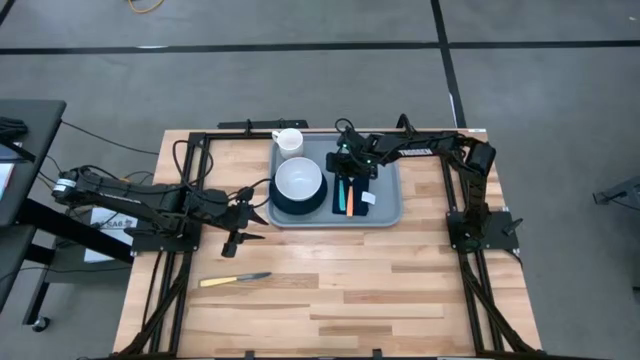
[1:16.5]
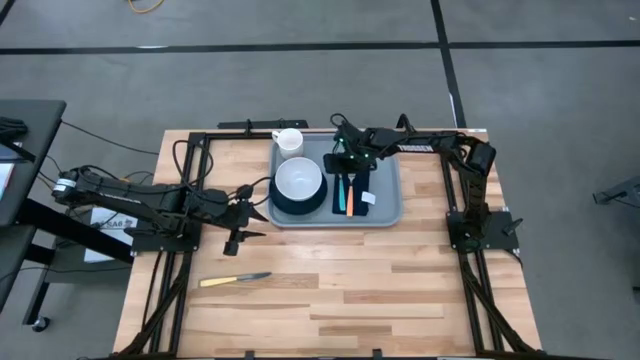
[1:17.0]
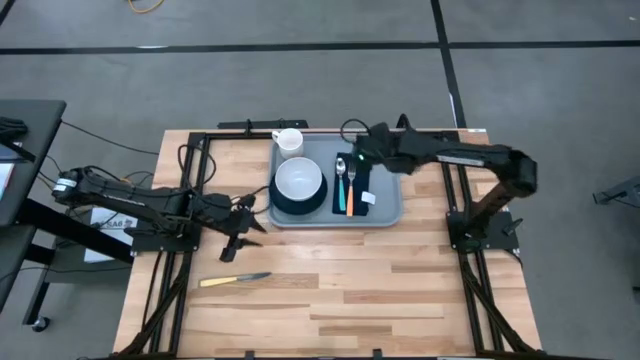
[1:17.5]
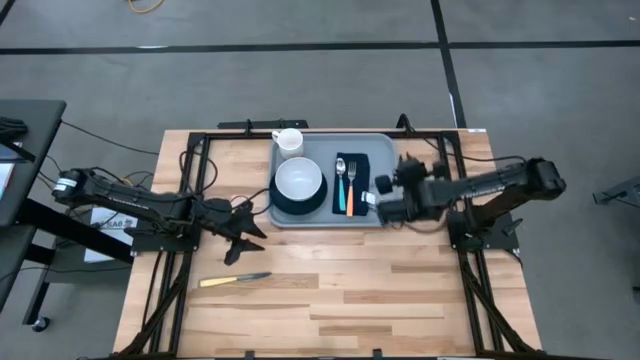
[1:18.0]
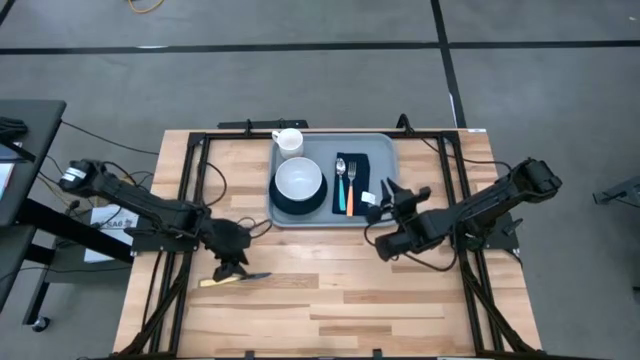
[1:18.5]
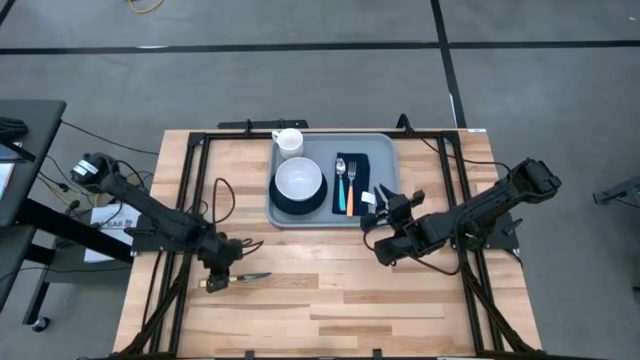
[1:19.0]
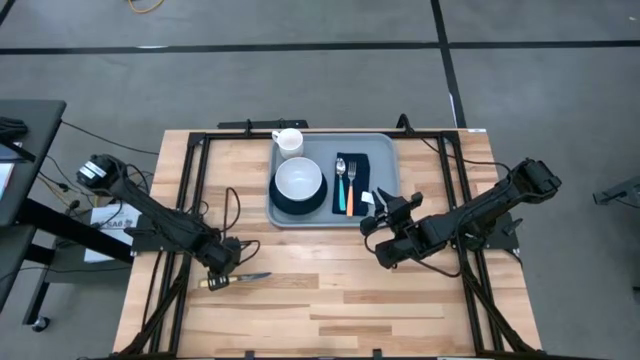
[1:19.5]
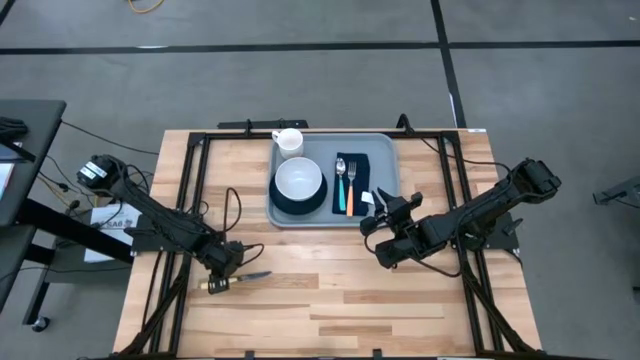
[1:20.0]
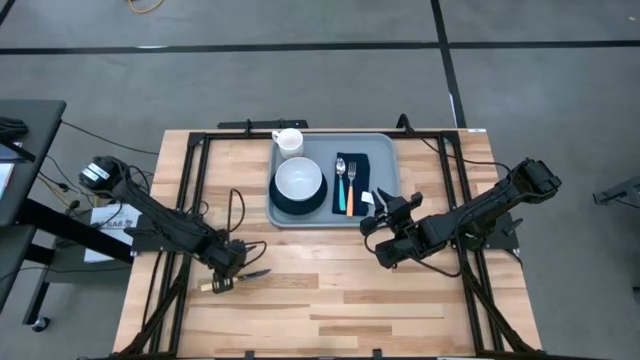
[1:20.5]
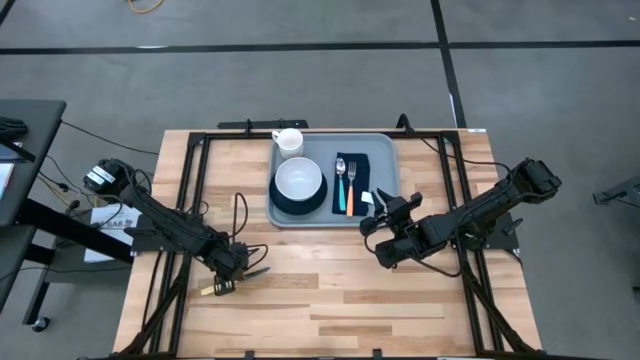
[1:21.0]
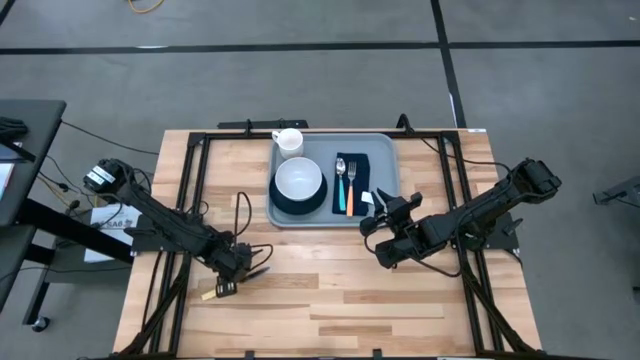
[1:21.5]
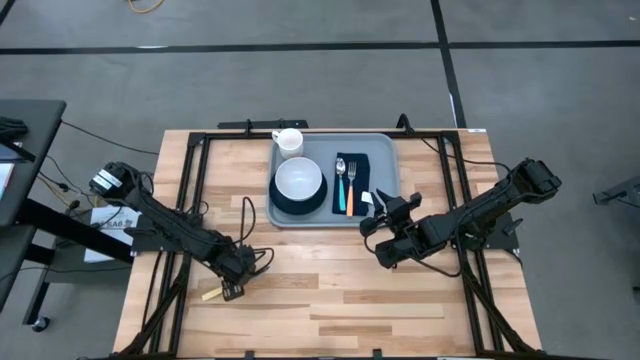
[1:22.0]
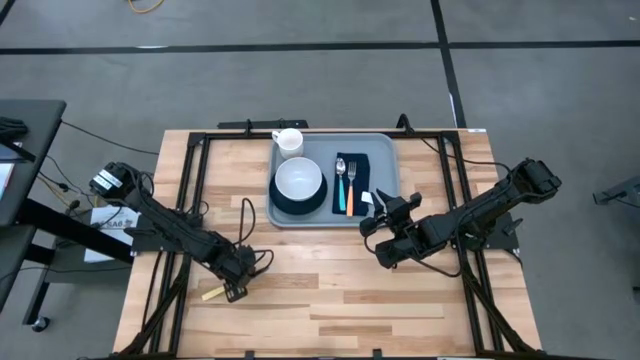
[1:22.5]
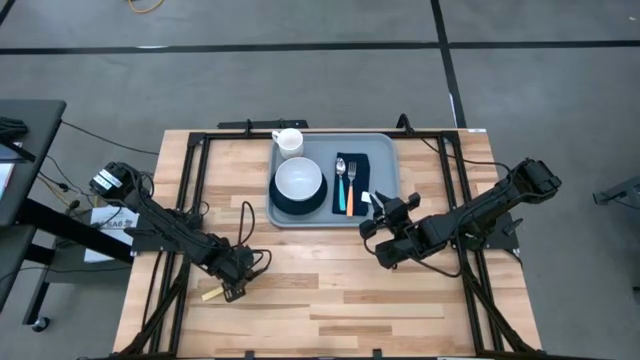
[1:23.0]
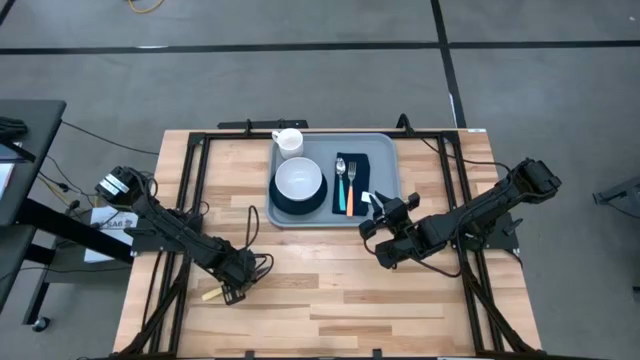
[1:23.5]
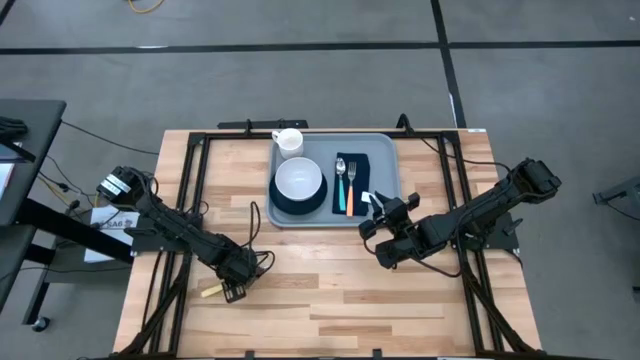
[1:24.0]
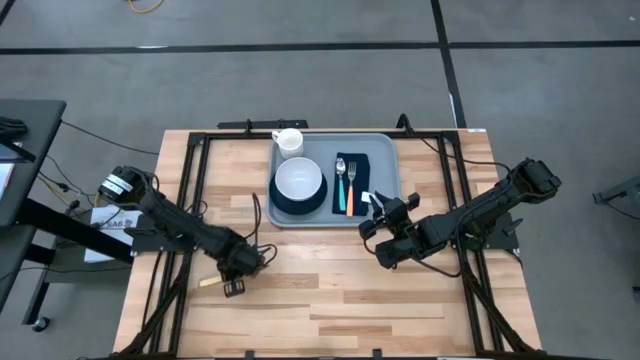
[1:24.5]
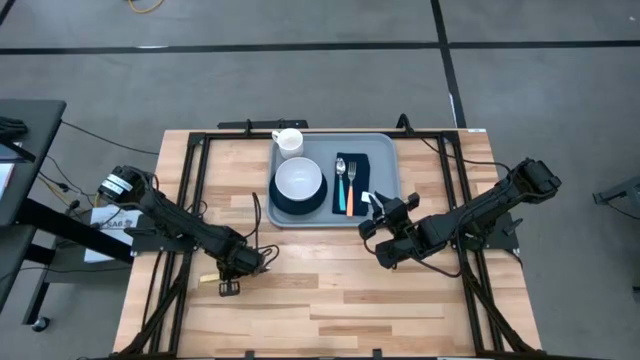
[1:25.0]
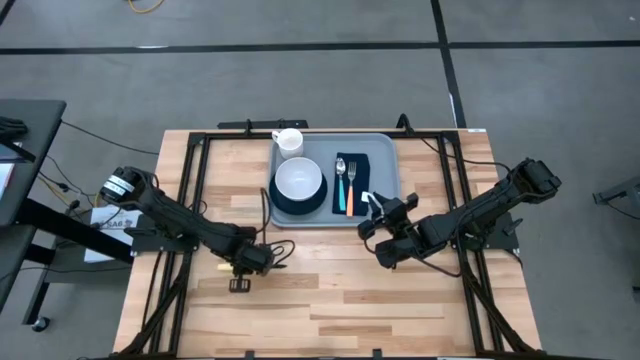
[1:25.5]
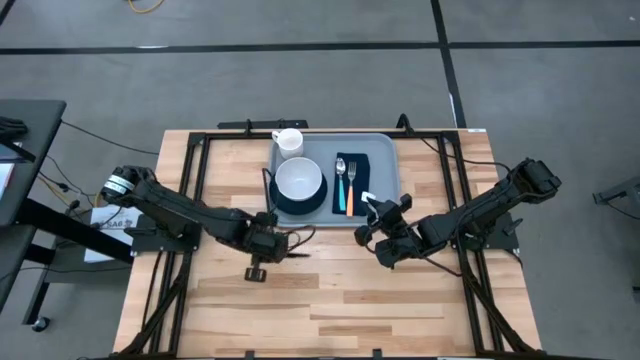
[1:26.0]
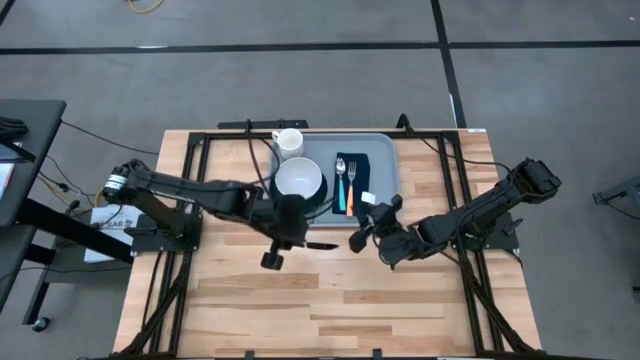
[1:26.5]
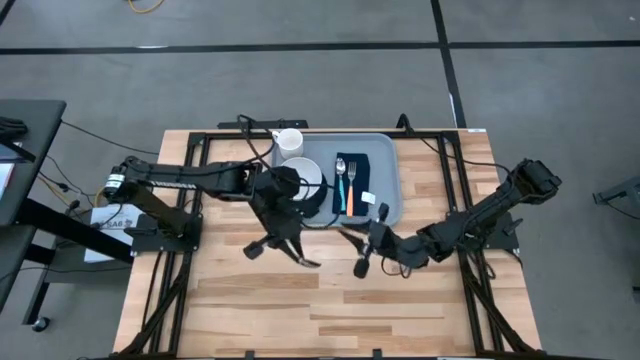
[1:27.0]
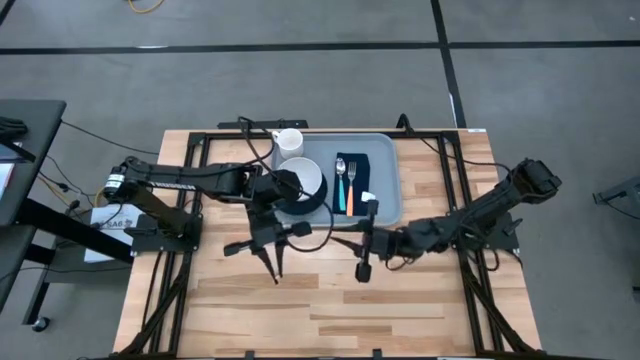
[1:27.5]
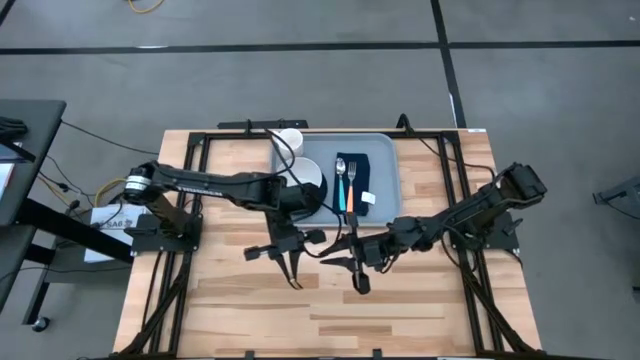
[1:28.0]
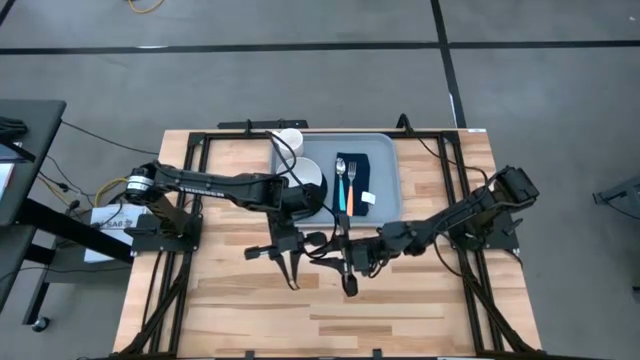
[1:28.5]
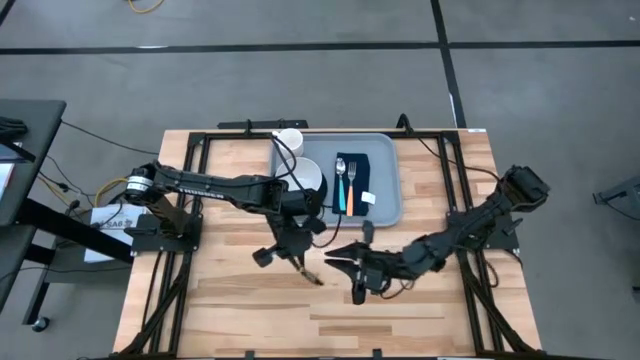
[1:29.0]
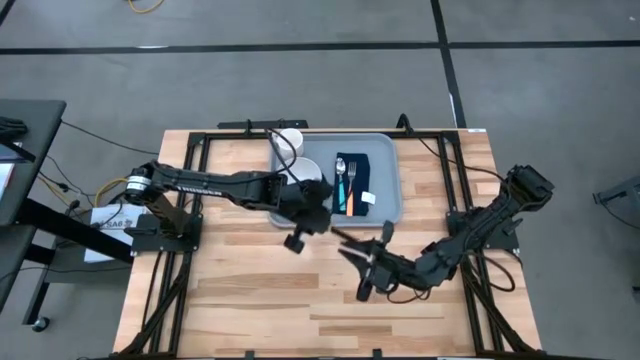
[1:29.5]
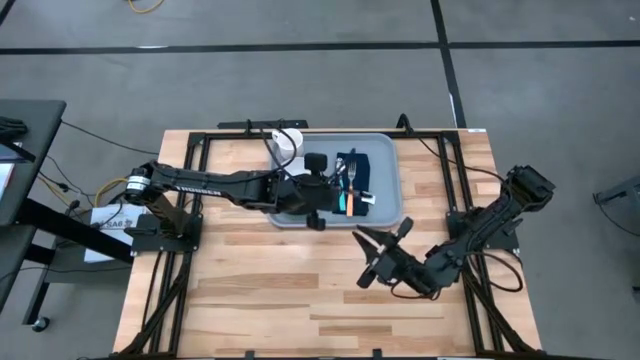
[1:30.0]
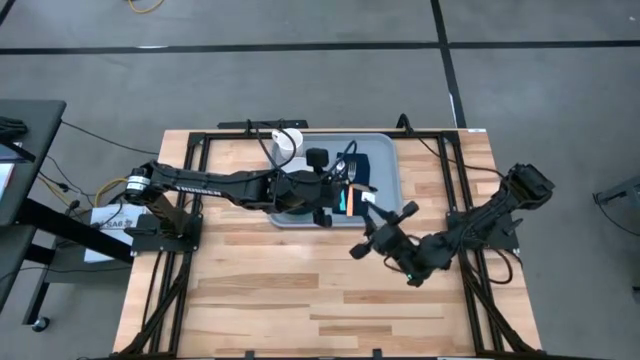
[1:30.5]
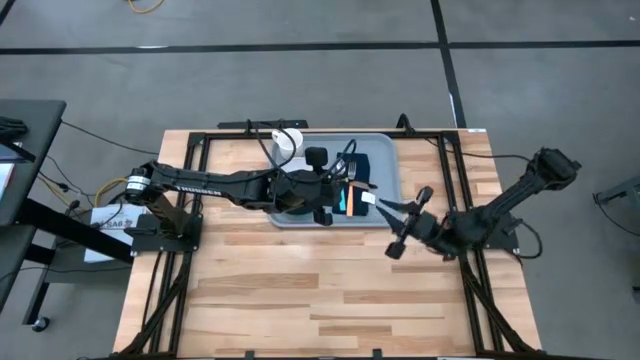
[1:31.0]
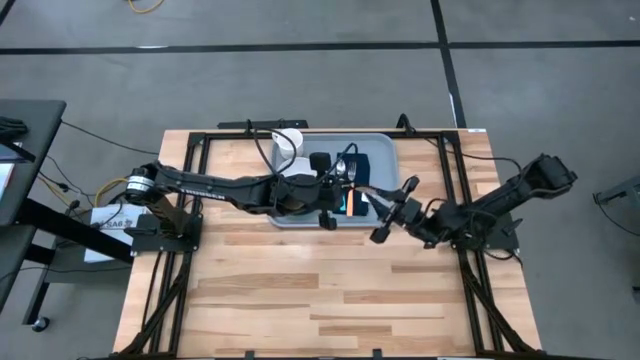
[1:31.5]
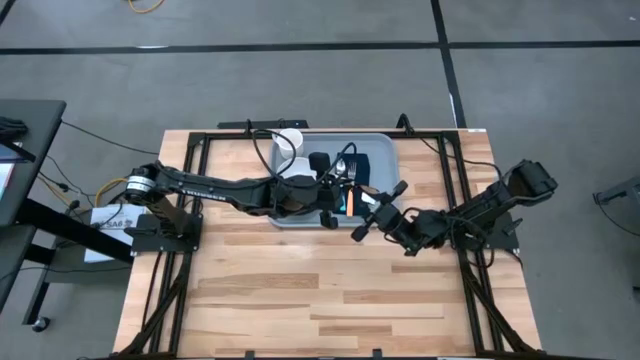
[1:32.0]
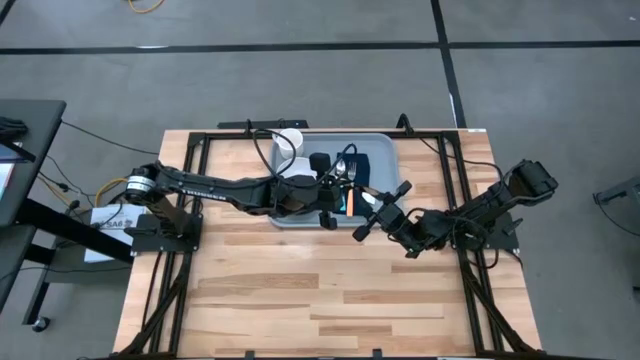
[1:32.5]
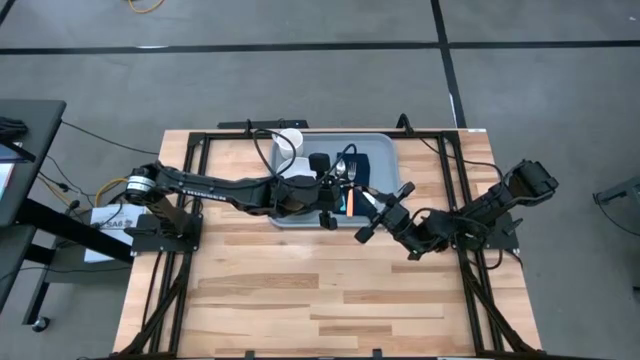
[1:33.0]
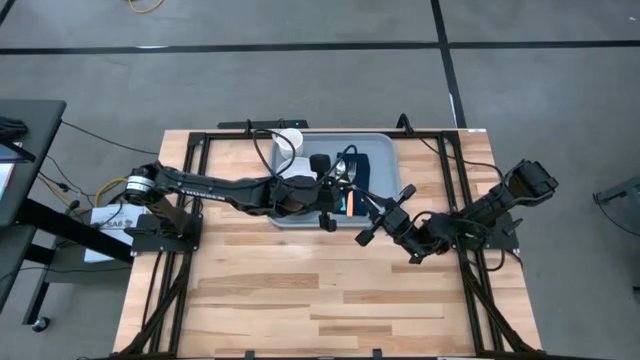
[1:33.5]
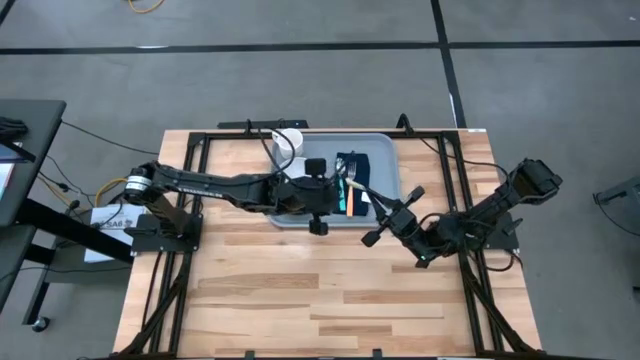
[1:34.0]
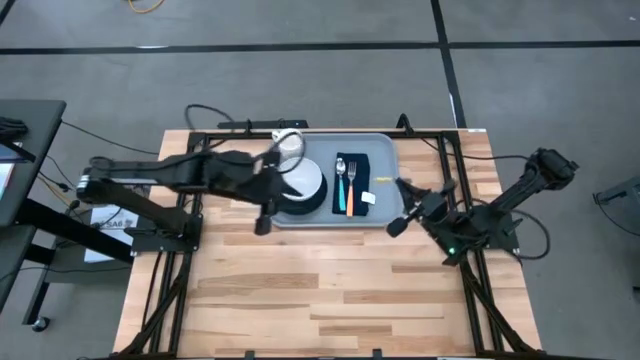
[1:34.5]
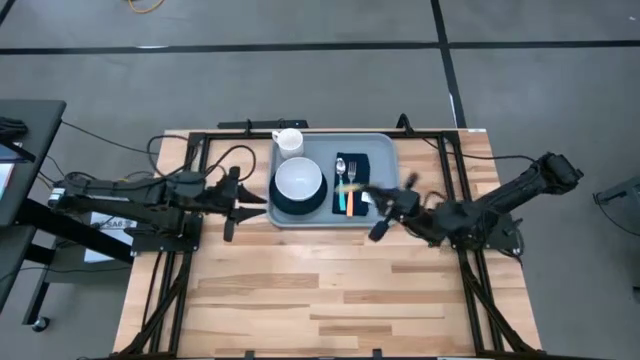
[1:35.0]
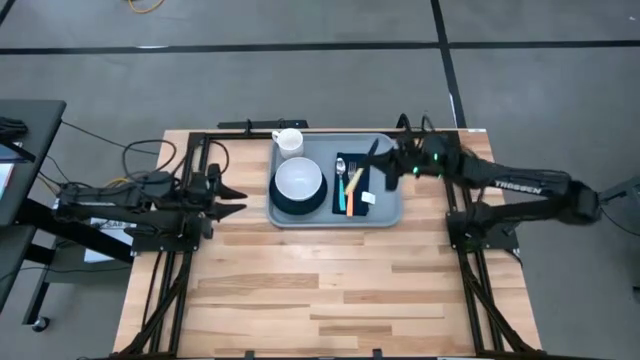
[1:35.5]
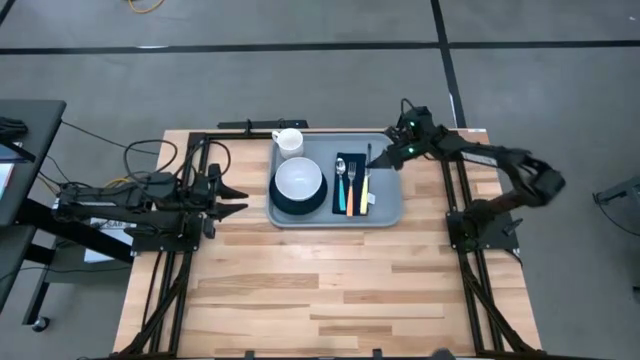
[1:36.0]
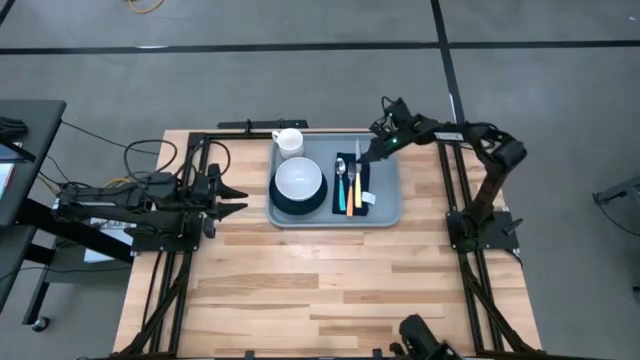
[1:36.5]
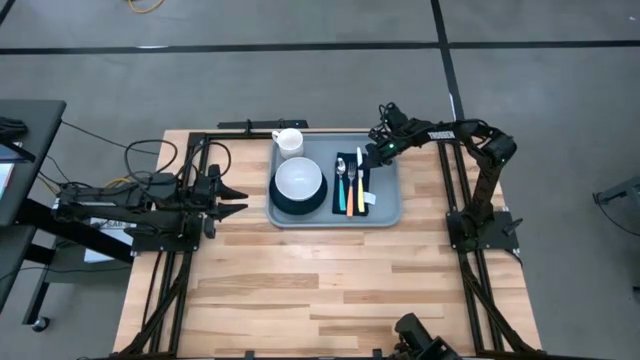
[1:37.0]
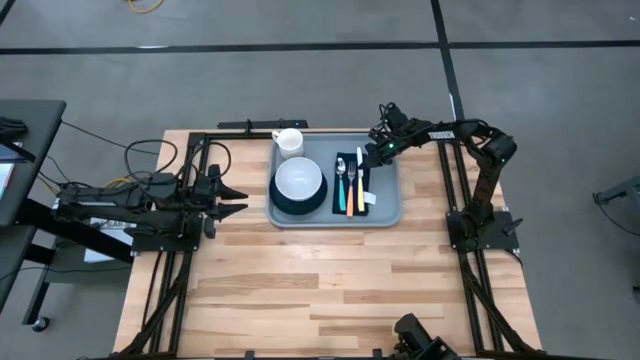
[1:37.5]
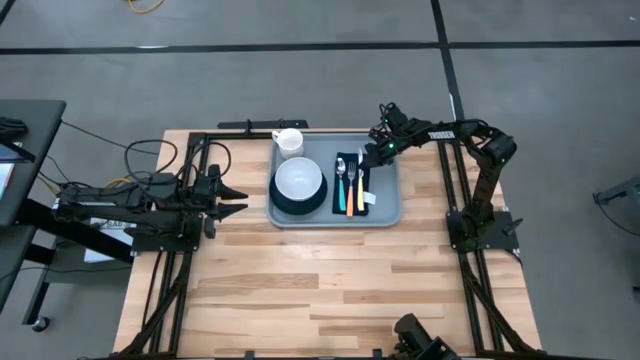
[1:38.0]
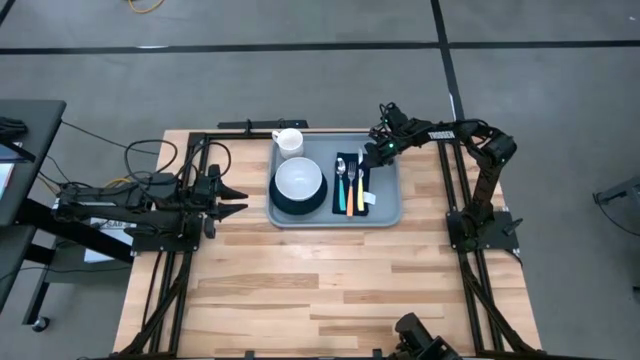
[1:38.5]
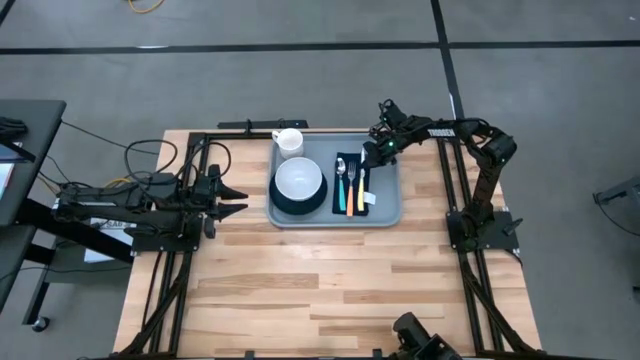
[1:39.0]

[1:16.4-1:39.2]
Task: Set up tray
Put the knife on the black table napkin on the gray serving tray
